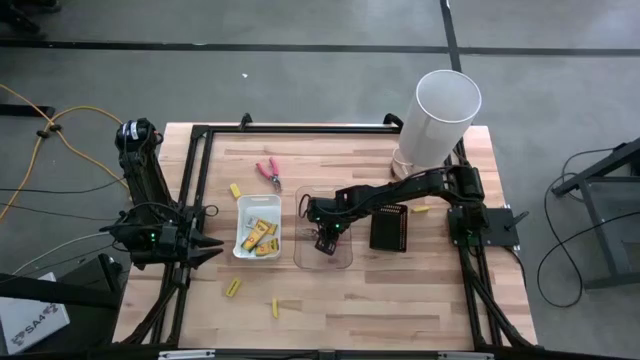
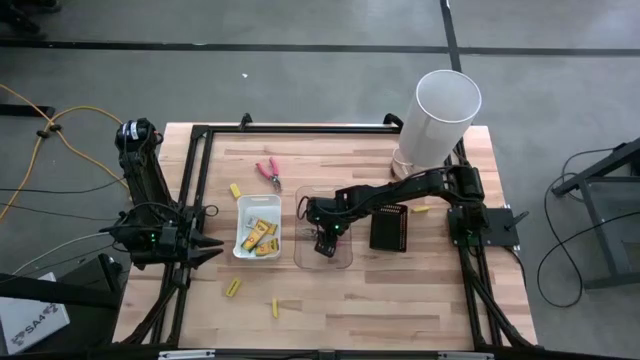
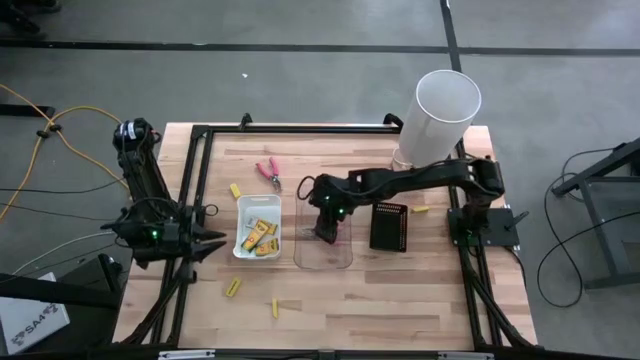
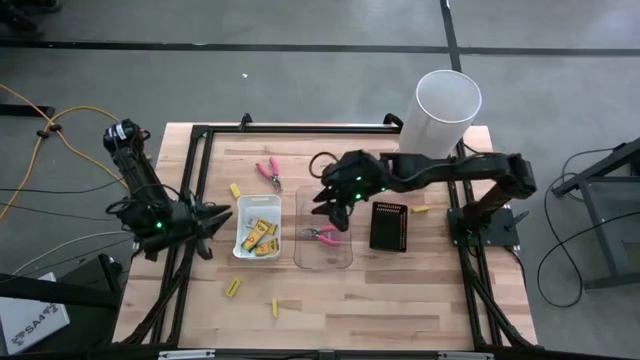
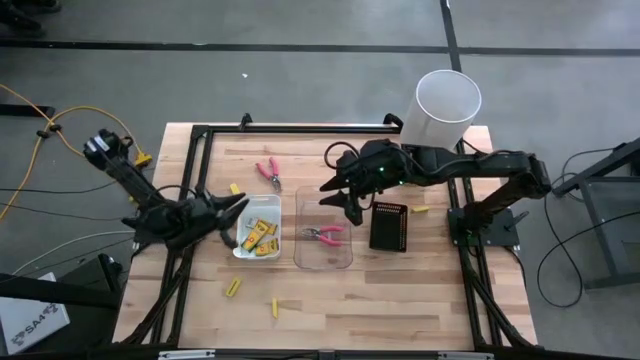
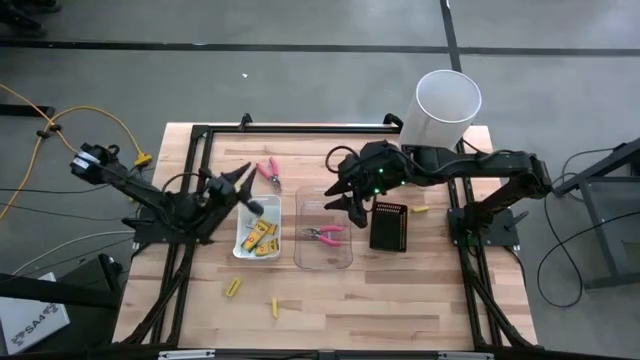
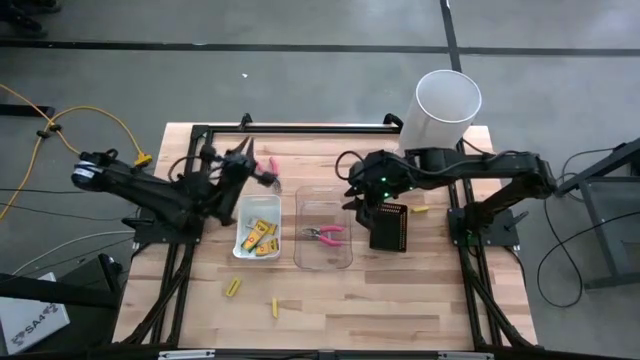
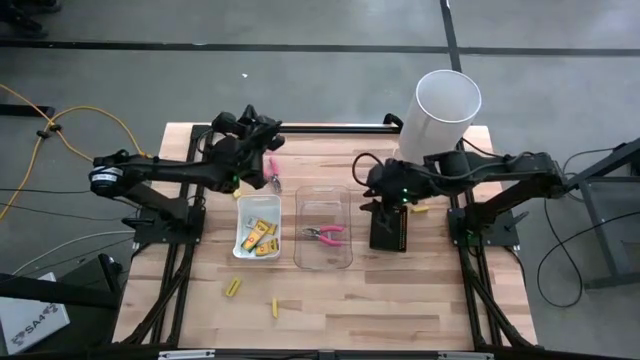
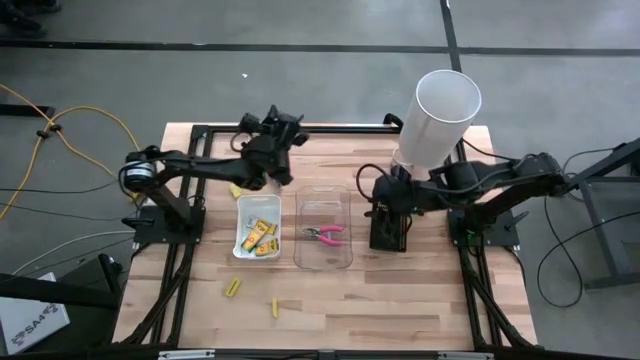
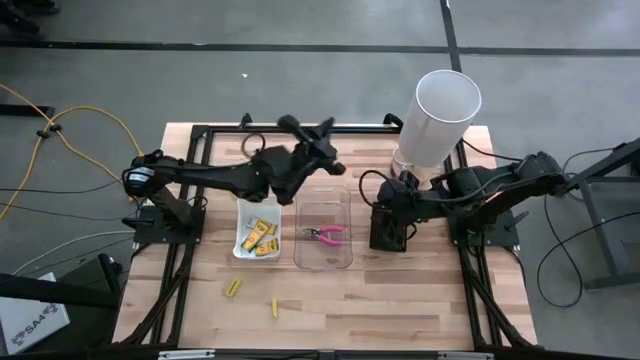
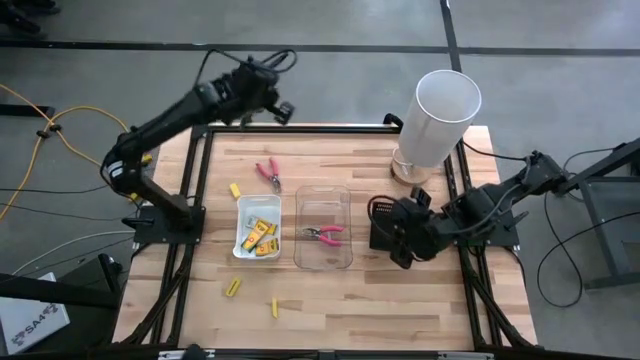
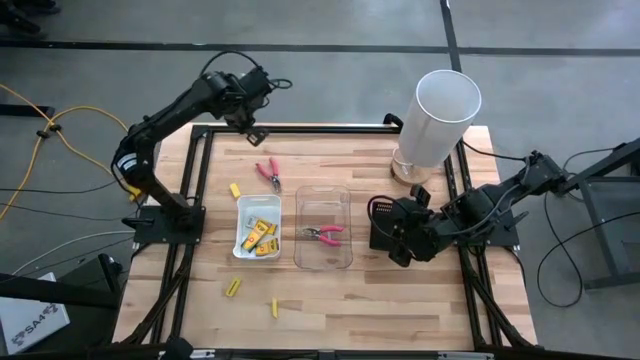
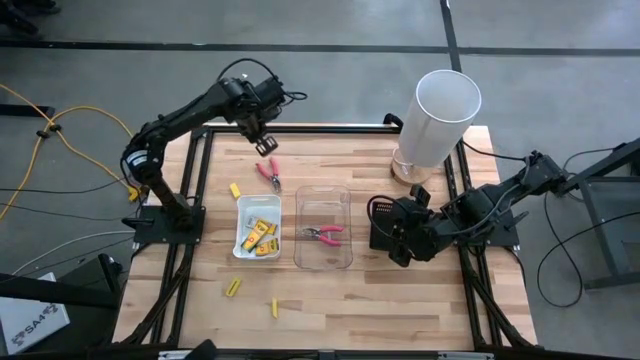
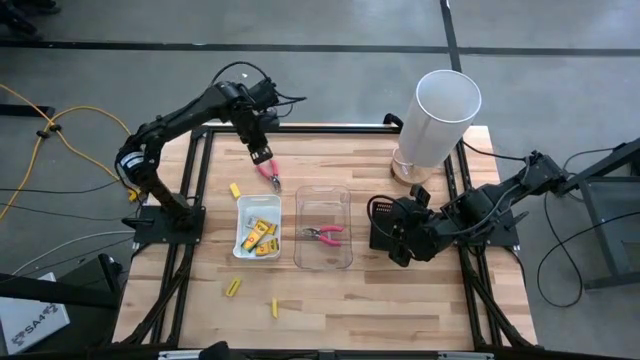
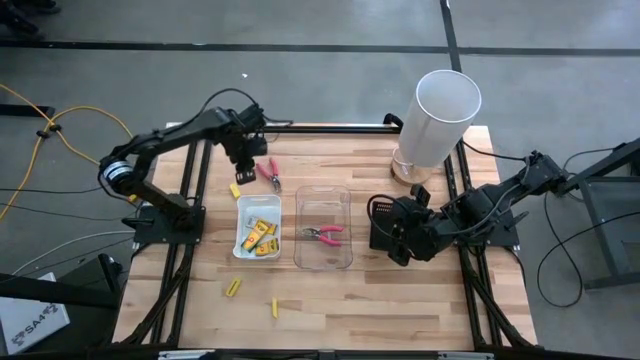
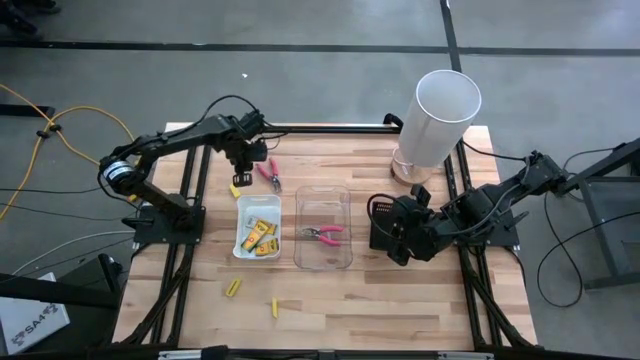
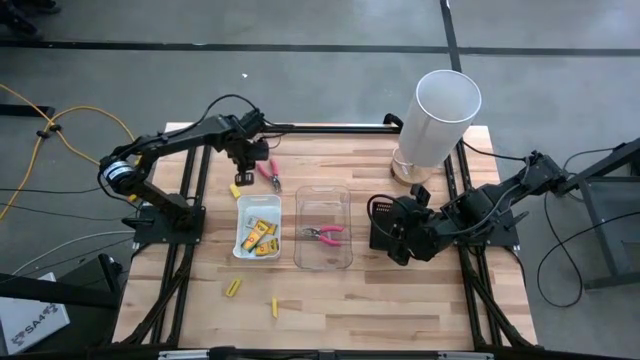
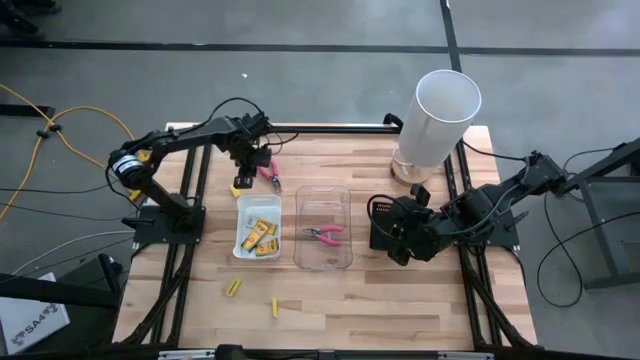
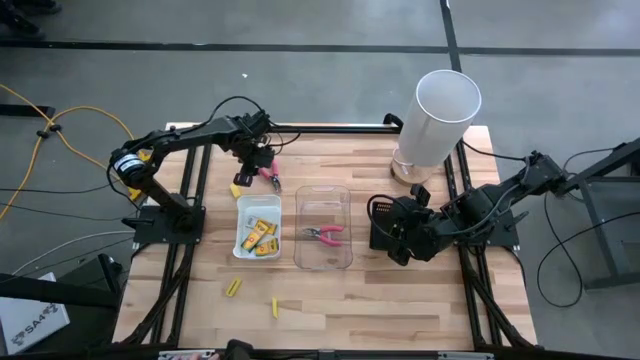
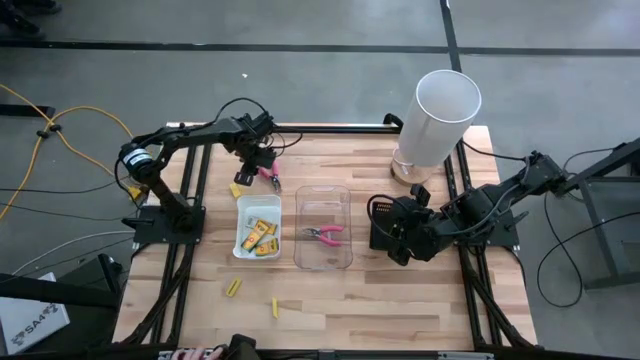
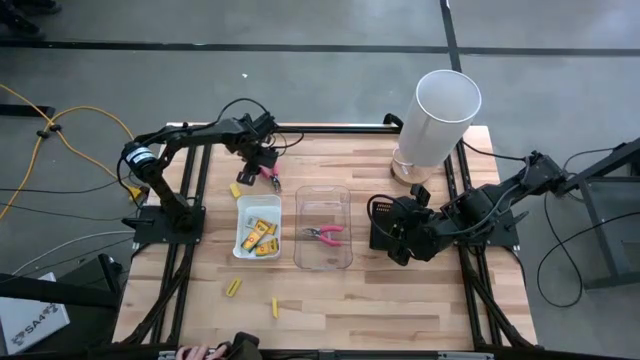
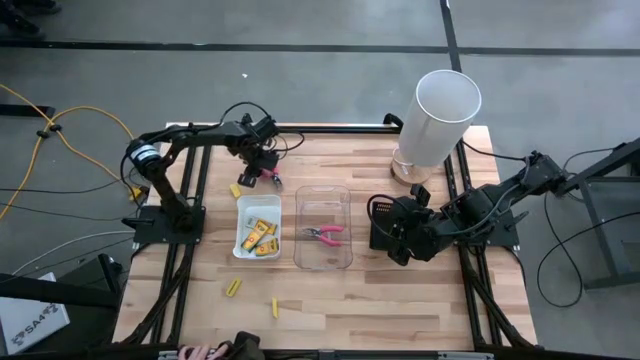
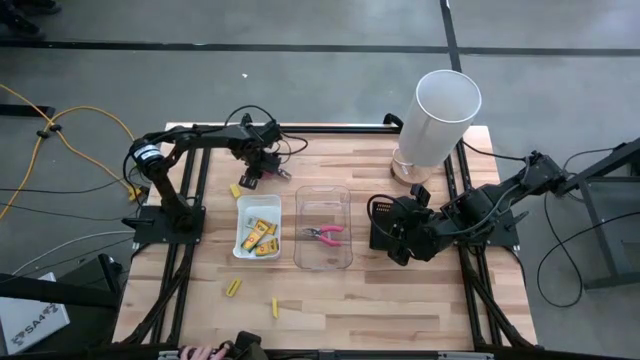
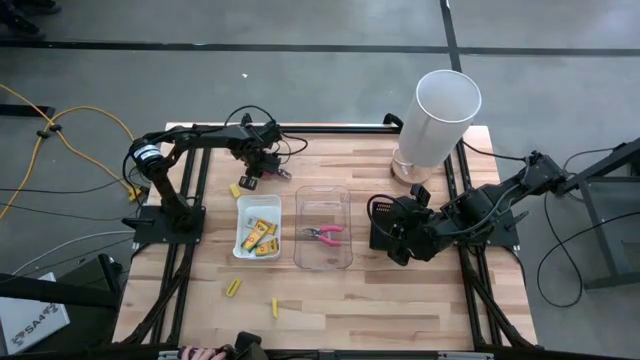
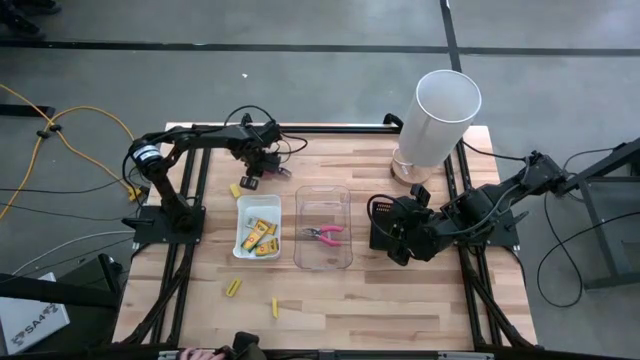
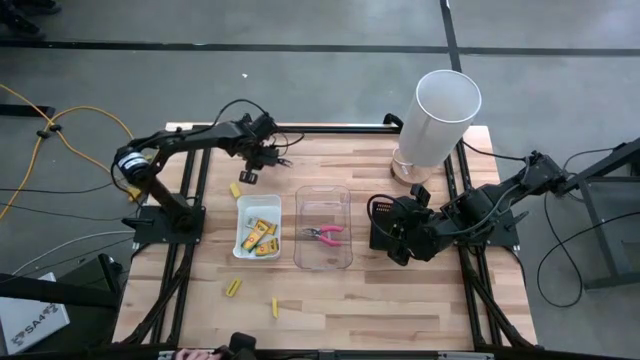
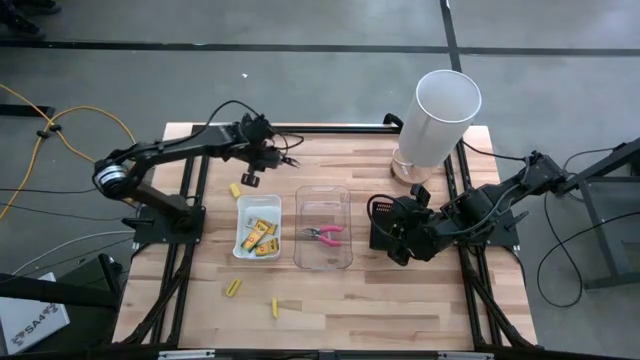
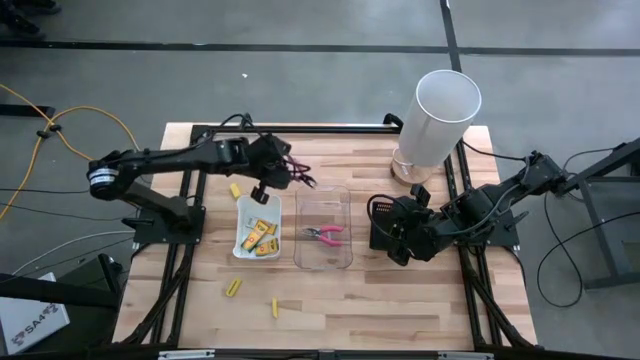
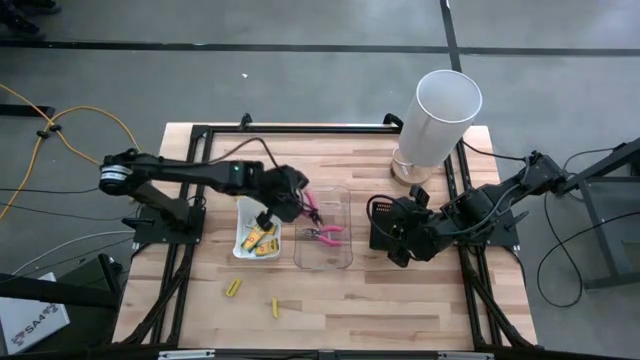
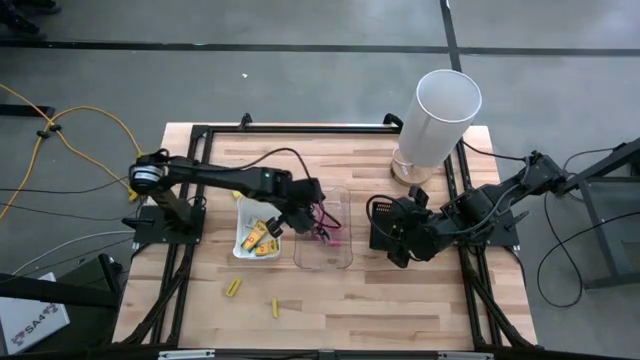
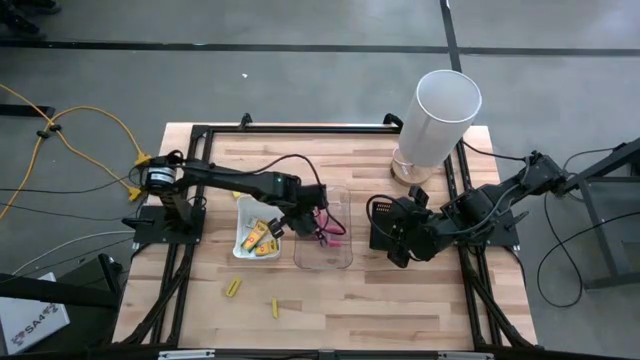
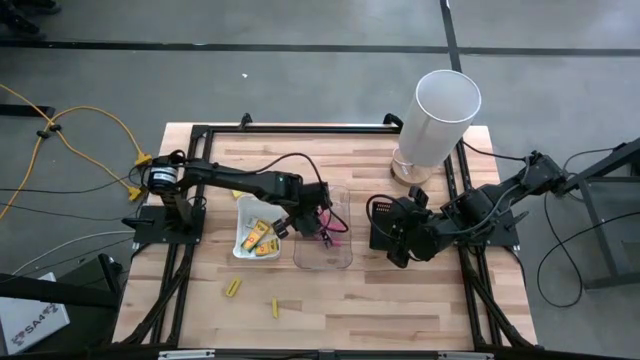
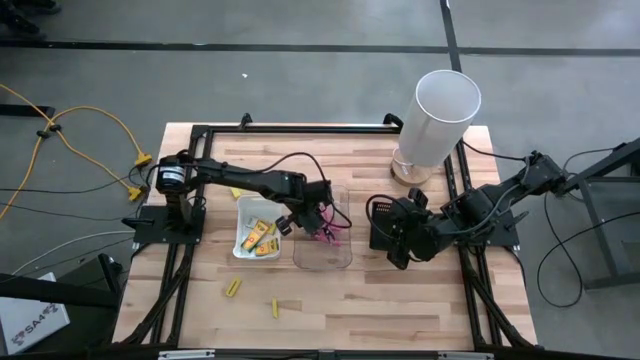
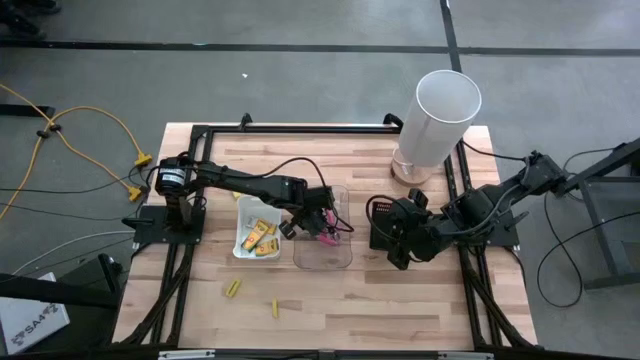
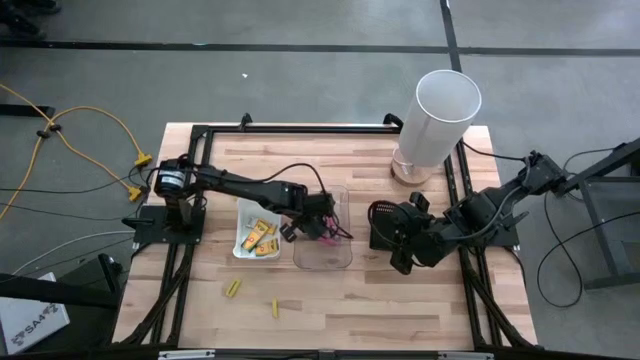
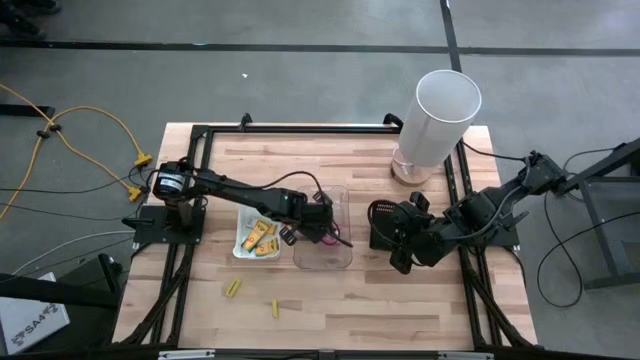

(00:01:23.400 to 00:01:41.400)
Task: Pick & Place School Supplies
Put the pink punch plier into the transparent bin

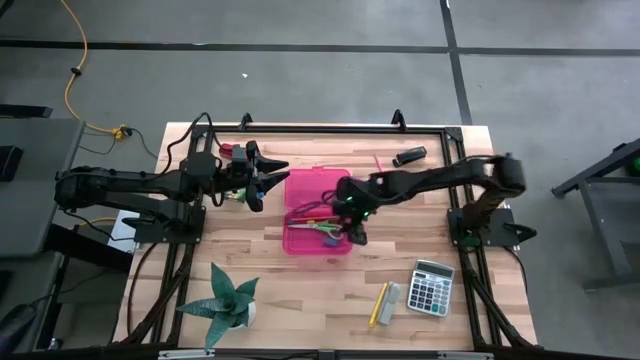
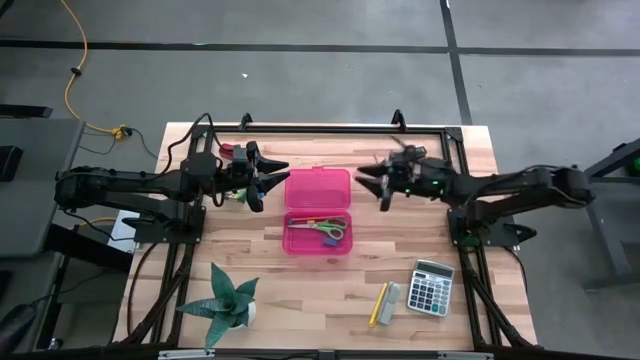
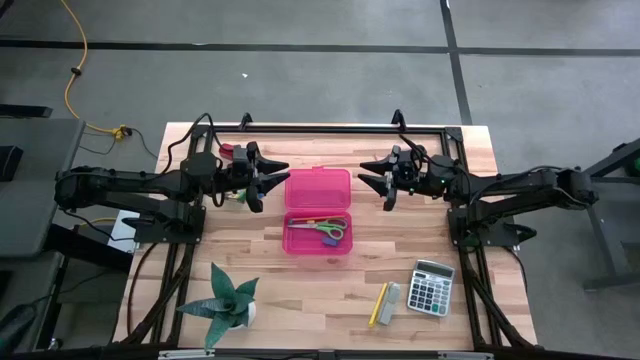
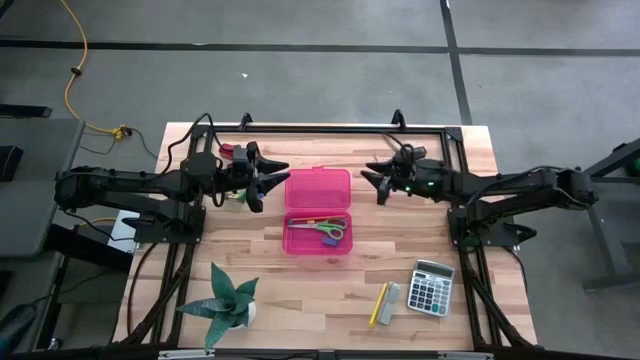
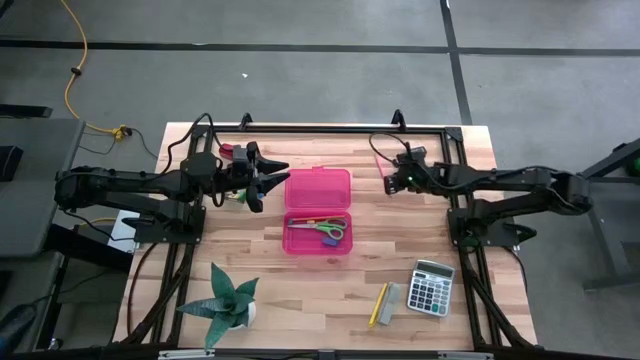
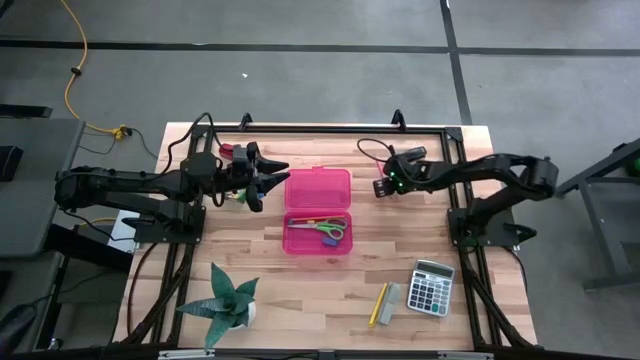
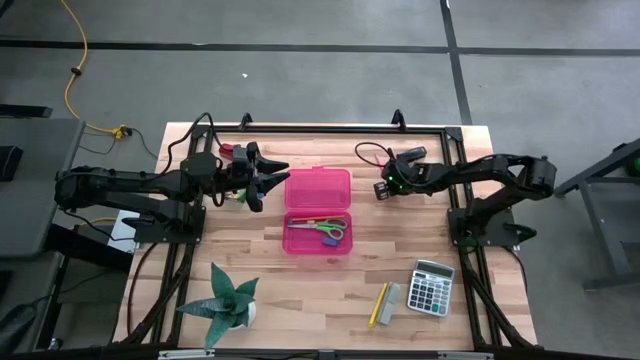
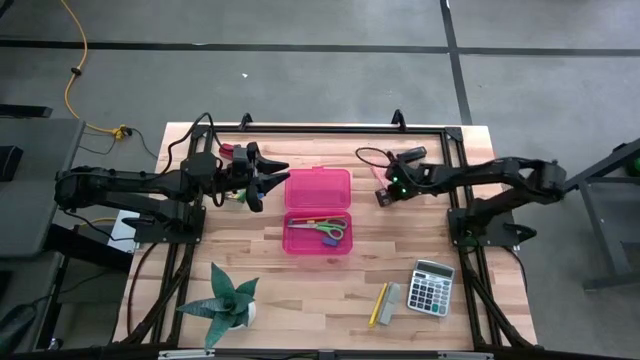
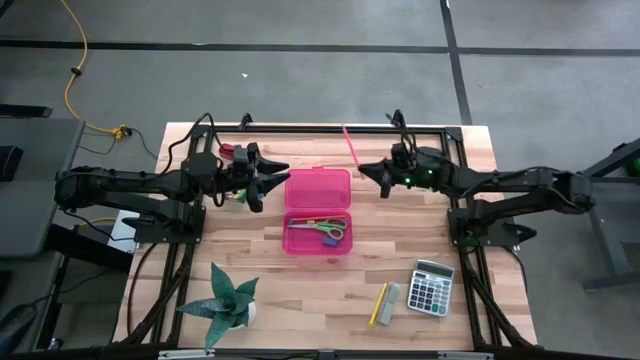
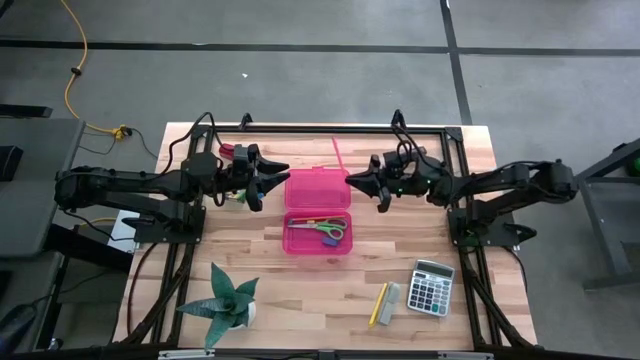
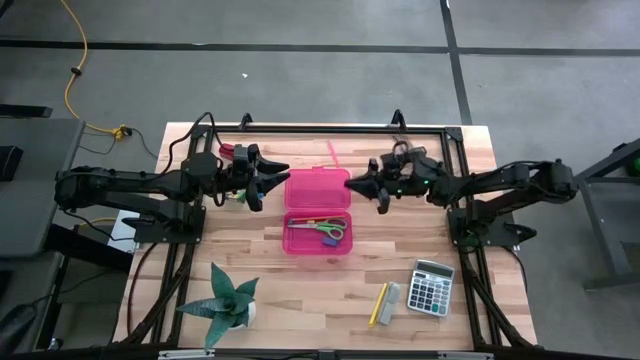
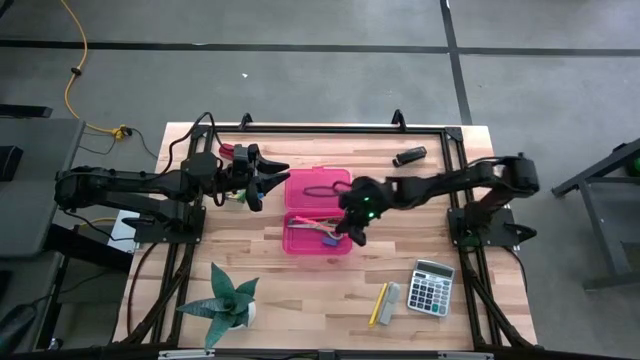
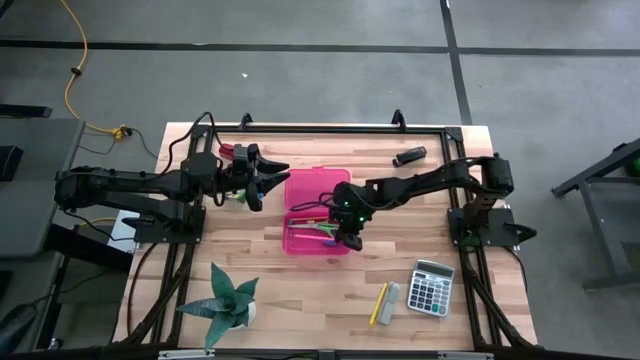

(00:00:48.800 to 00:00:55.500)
Task: Pack school essentials
Put the pink pencil into the pink supply box
